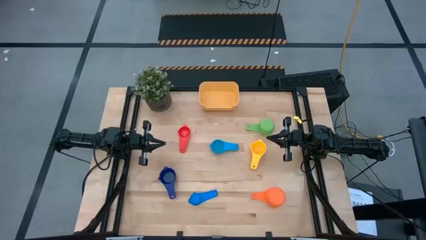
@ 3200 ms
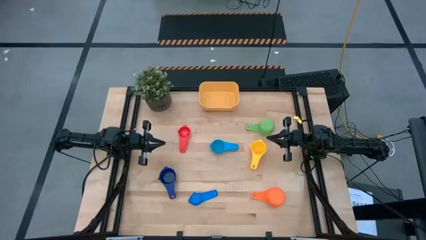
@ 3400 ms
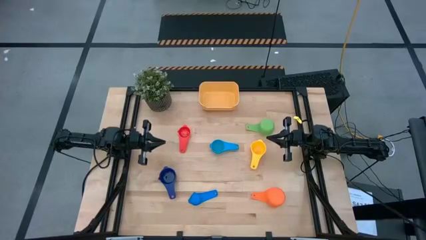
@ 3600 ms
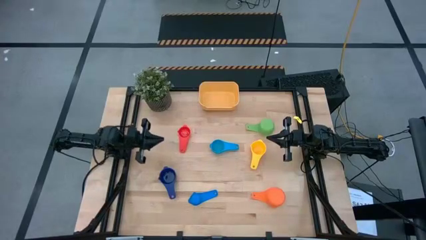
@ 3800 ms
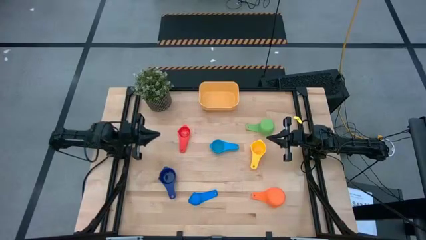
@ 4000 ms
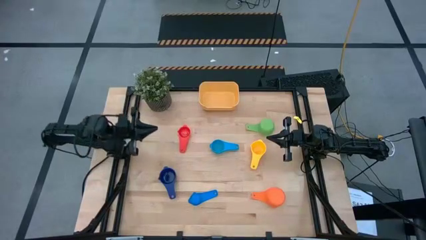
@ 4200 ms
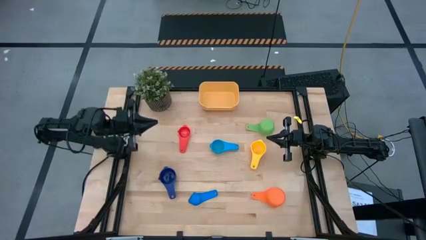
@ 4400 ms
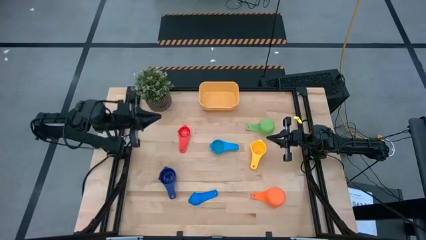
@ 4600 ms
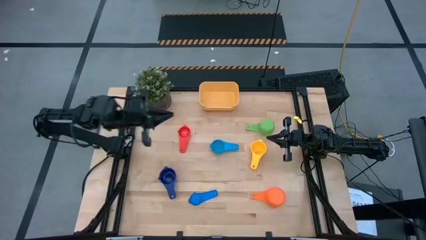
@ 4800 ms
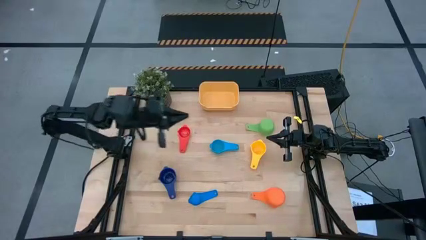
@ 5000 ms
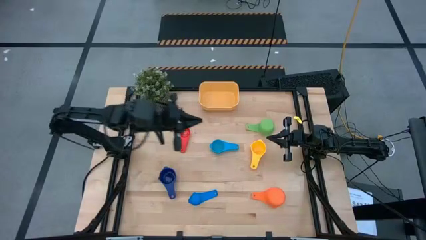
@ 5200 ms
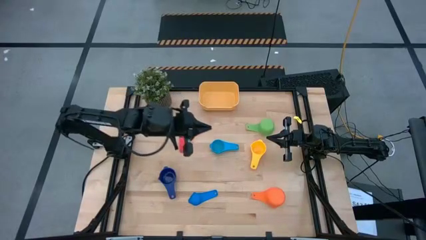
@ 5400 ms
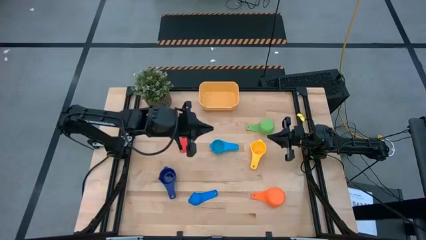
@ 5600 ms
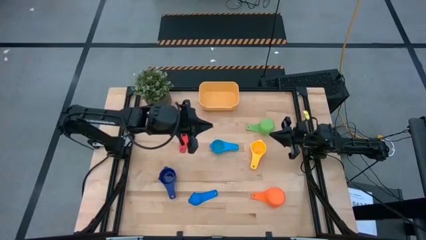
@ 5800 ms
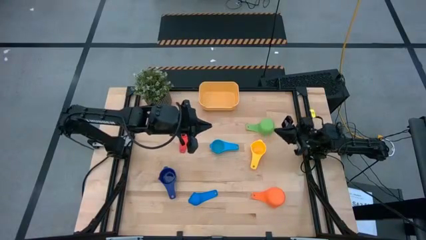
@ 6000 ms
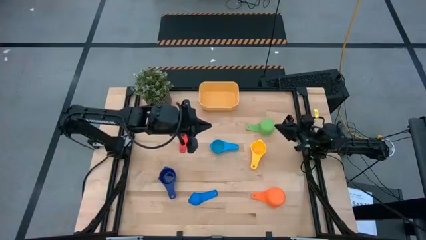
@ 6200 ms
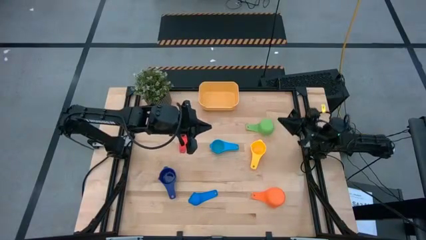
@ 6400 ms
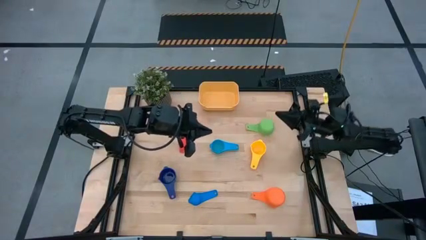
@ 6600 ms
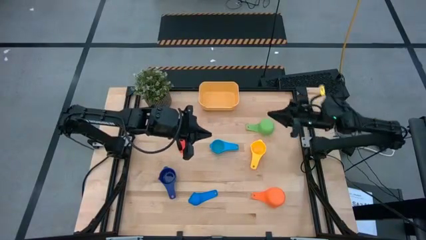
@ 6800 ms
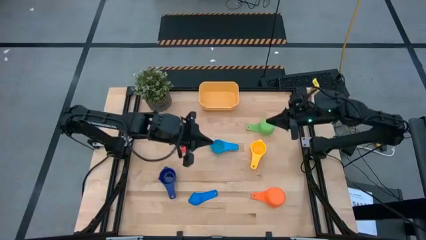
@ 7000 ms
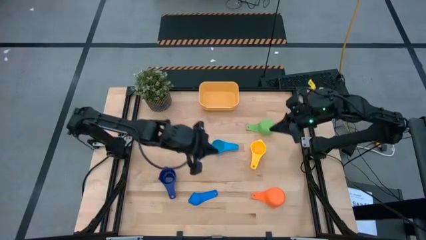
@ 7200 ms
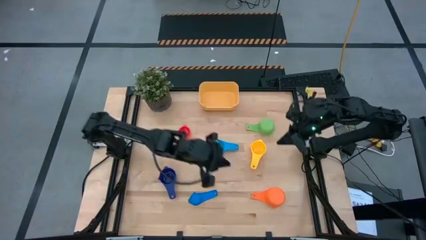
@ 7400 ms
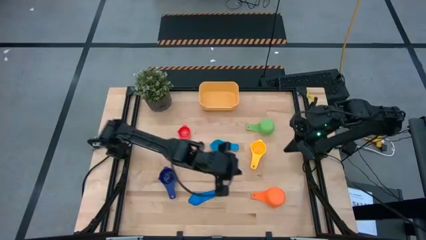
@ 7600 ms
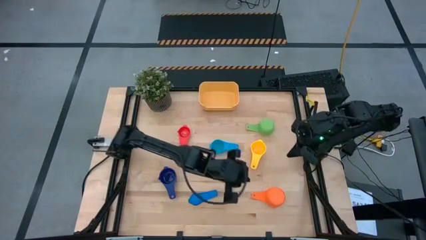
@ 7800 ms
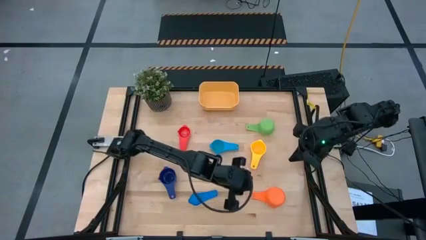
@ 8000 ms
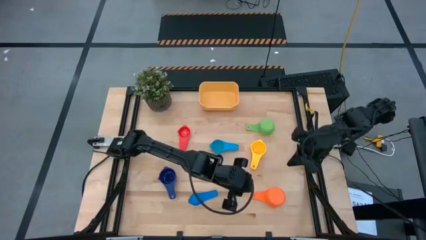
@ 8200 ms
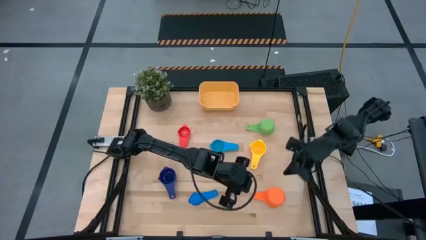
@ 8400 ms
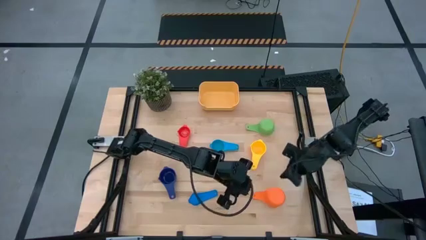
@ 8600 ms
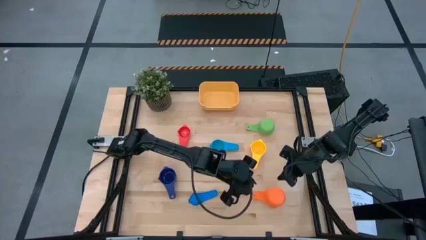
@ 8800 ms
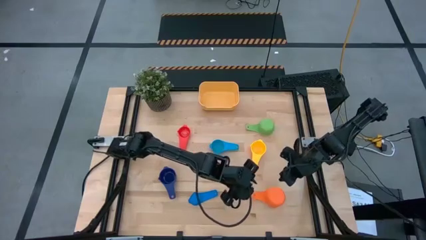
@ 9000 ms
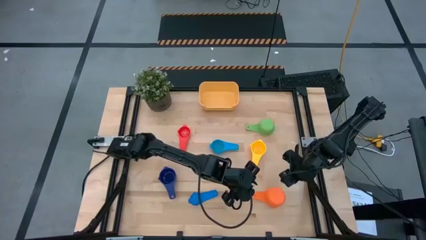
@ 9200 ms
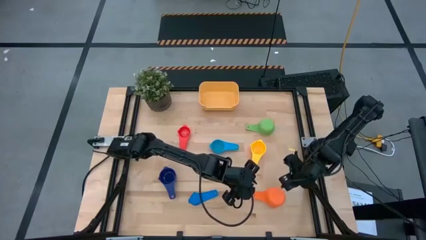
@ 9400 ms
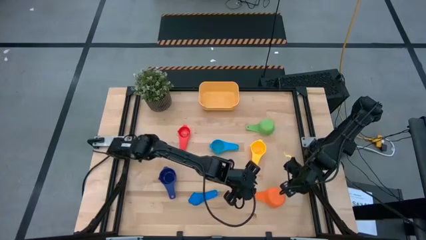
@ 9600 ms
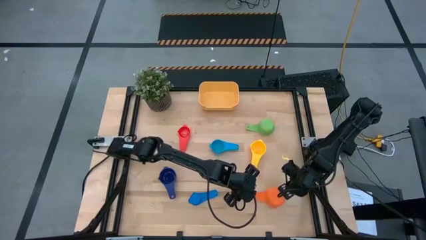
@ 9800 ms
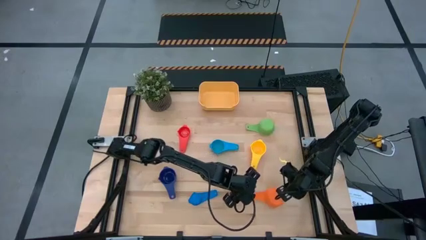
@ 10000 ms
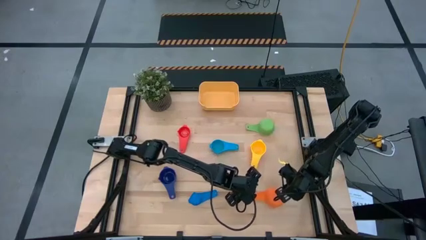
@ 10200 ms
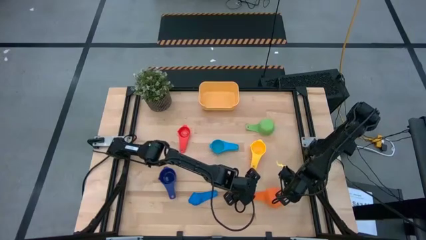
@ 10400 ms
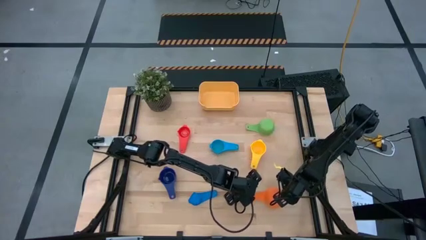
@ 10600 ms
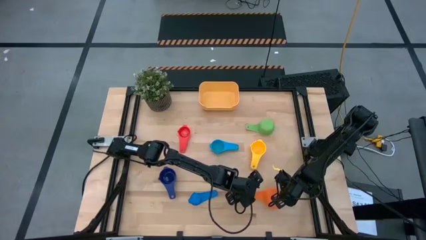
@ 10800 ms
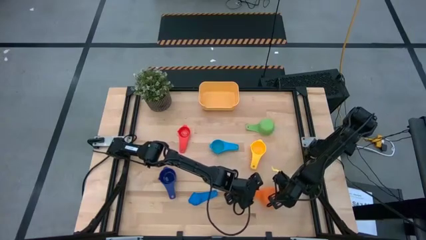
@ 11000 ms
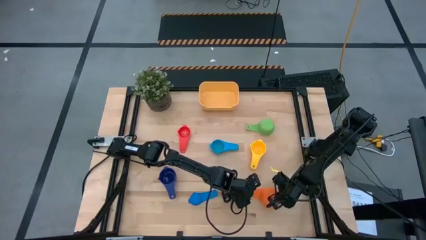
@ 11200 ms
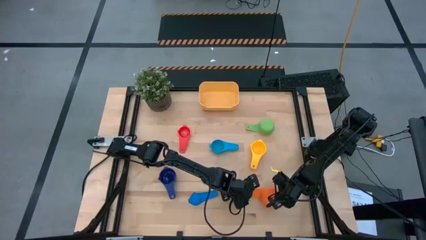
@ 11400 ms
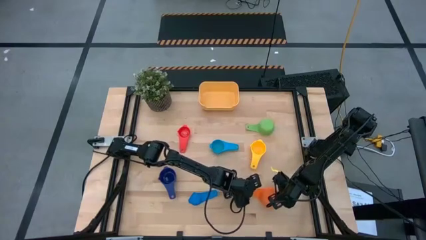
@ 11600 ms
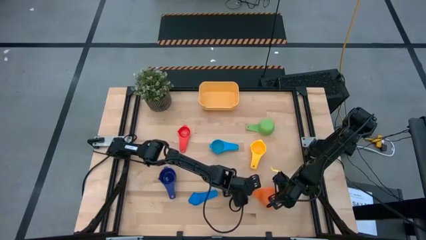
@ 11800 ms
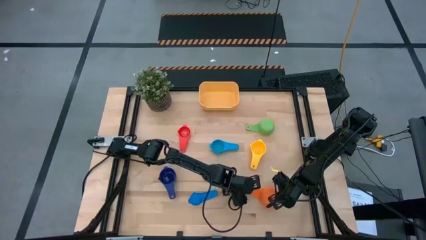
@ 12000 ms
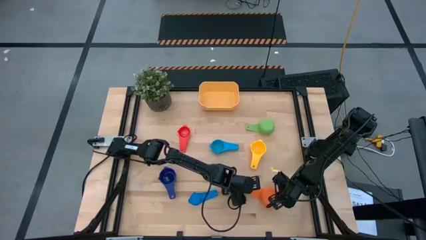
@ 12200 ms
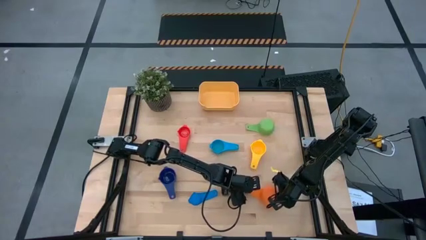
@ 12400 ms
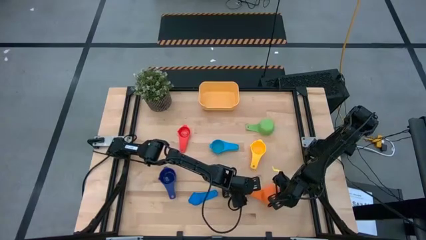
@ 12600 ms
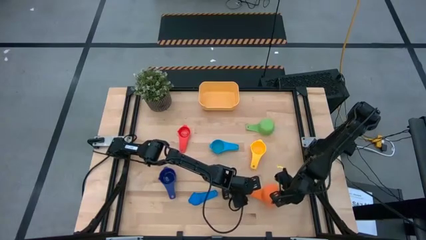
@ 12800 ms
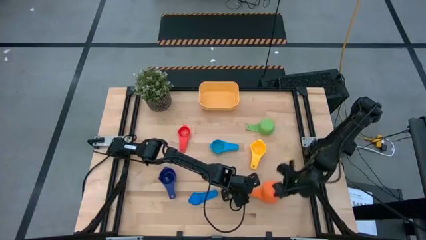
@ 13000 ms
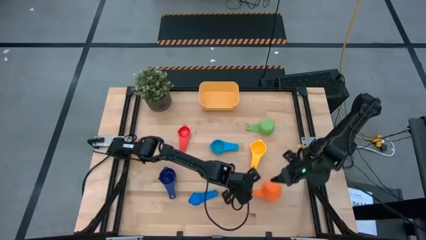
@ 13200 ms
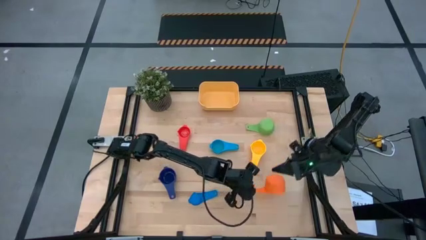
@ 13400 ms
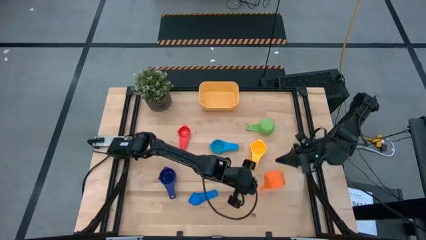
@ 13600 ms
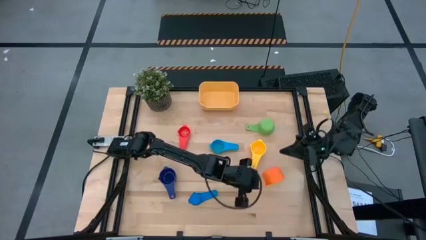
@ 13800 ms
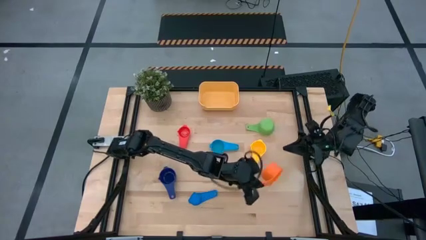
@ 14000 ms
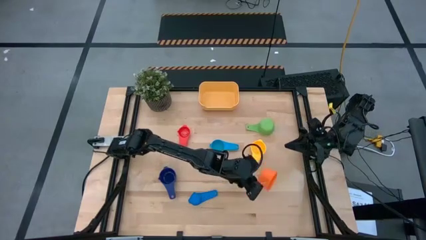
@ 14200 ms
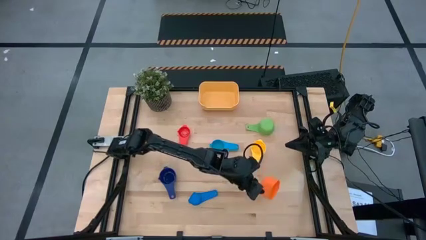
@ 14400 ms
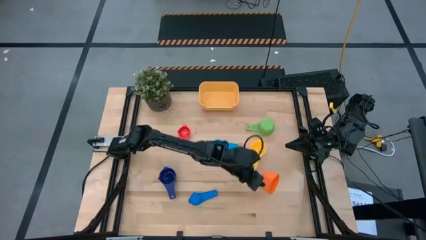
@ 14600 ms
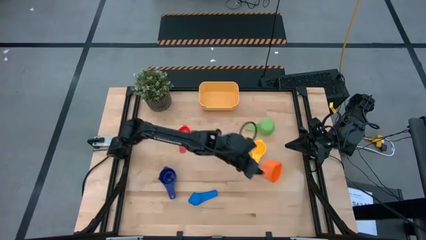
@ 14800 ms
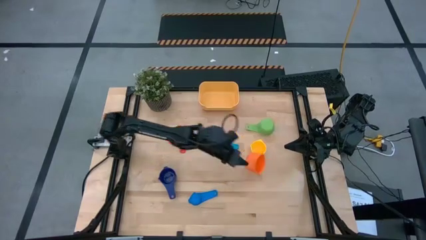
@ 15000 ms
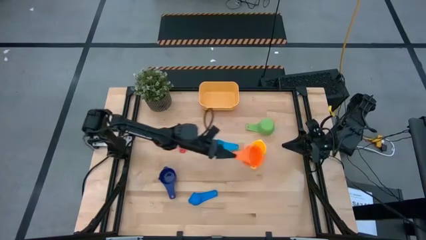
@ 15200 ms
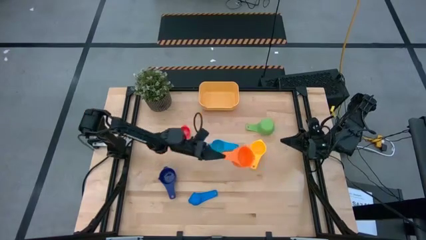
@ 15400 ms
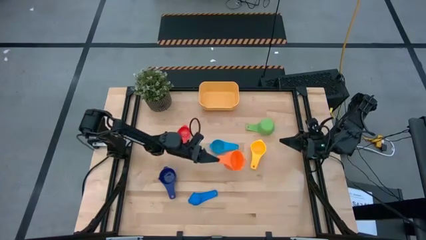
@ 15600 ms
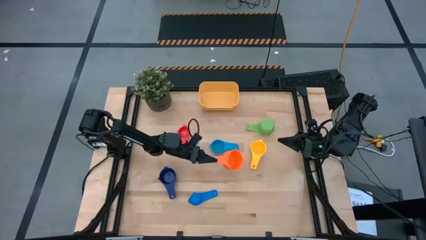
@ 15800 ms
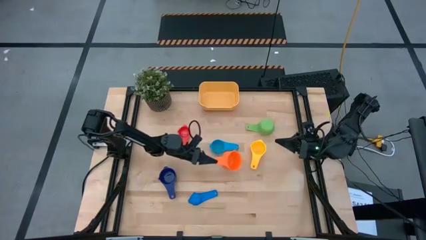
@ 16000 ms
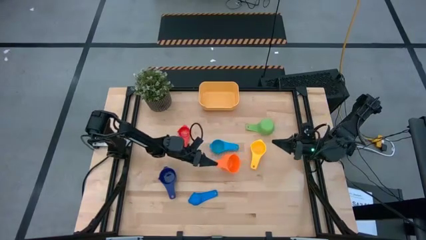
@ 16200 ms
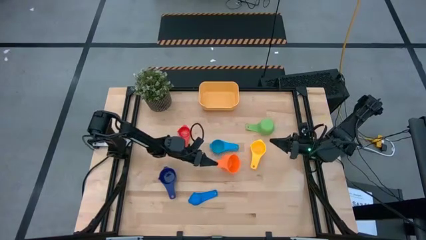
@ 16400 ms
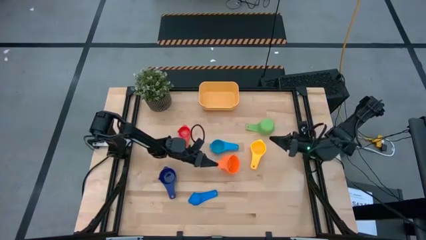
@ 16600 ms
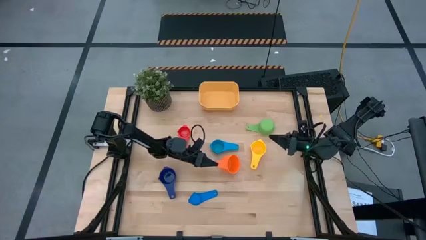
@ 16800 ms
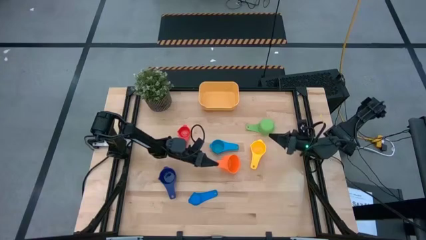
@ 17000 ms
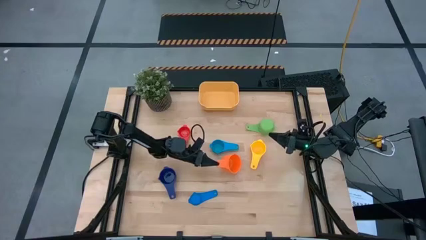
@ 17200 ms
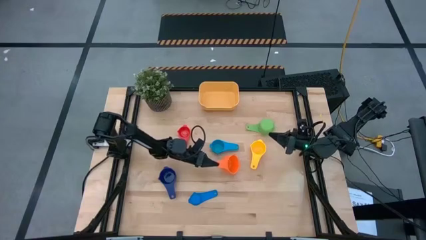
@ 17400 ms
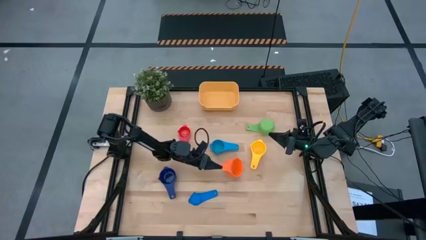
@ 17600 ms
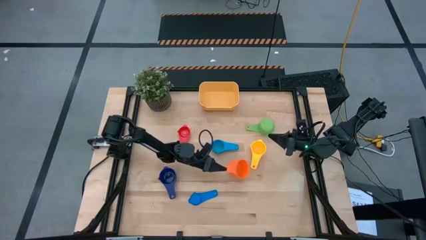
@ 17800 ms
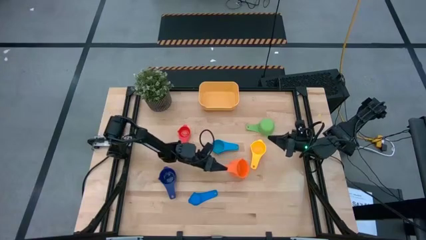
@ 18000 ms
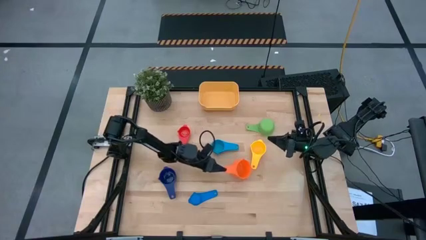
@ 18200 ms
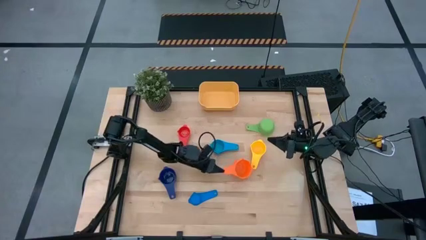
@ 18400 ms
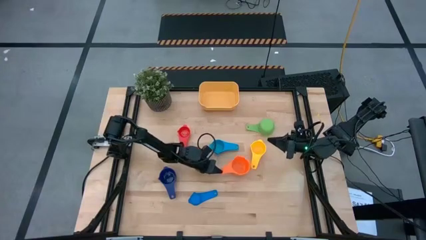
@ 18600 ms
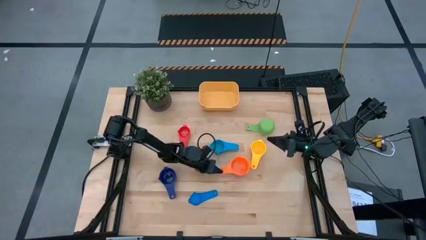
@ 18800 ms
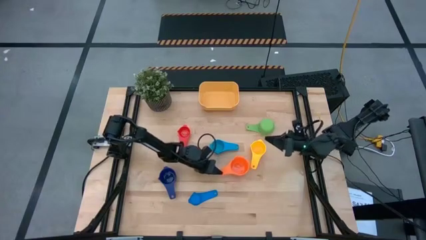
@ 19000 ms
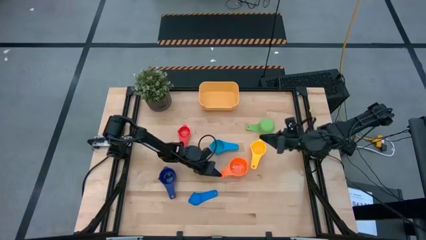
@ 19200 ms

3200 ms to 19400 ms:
Task: Nest measuring cups in basket
Move the orange measuring cup to the center of the table
